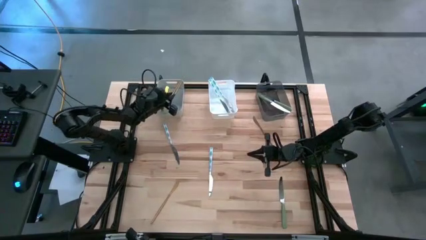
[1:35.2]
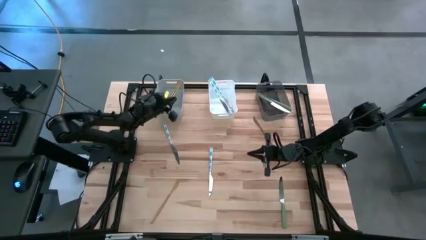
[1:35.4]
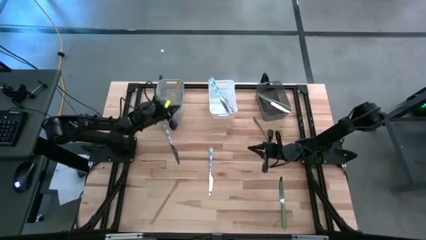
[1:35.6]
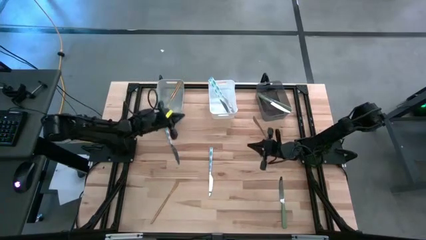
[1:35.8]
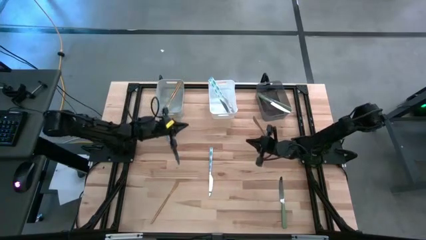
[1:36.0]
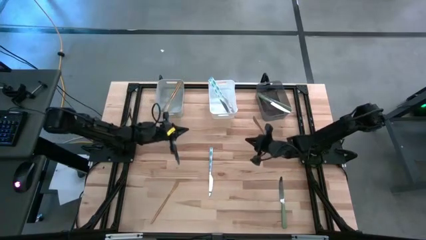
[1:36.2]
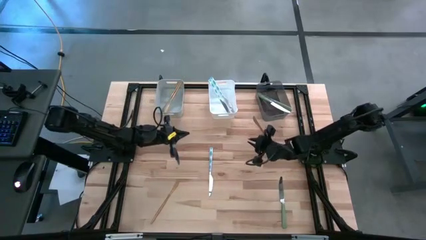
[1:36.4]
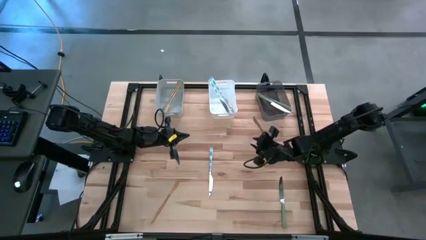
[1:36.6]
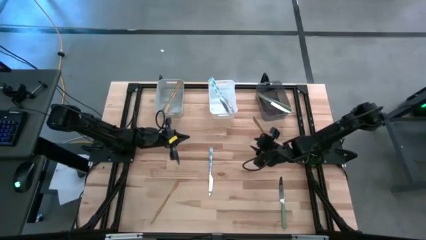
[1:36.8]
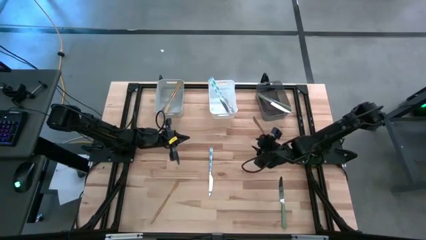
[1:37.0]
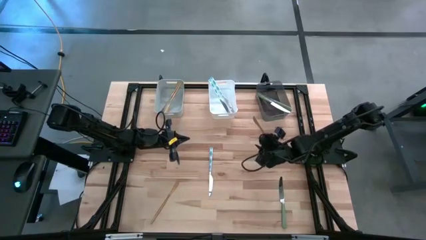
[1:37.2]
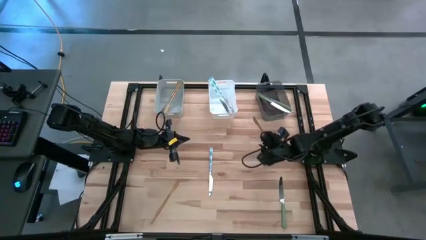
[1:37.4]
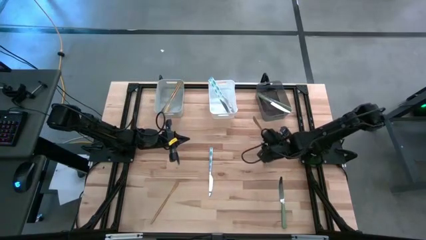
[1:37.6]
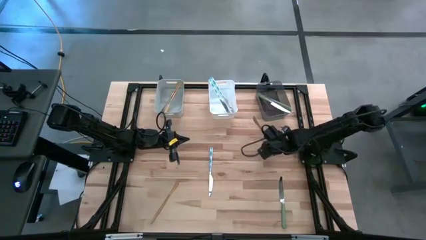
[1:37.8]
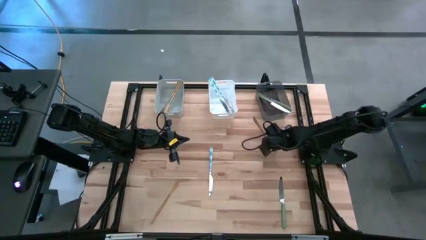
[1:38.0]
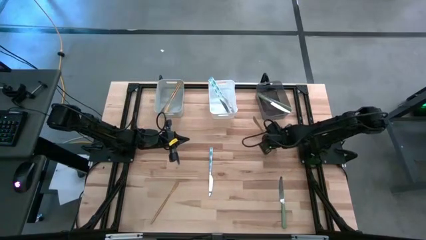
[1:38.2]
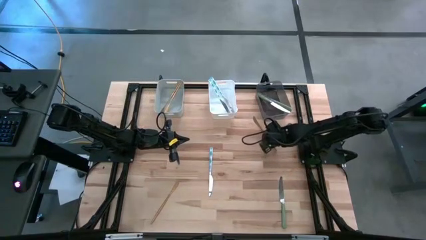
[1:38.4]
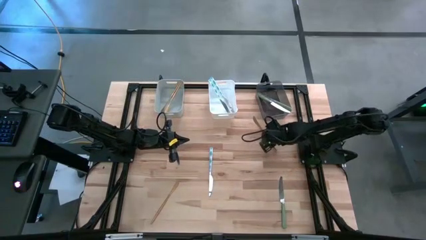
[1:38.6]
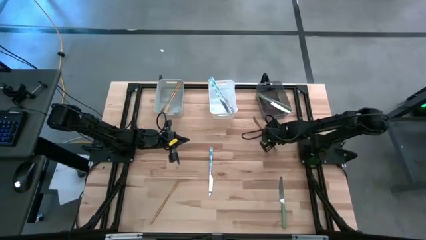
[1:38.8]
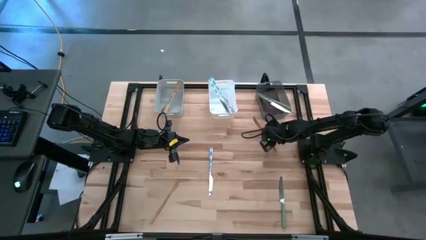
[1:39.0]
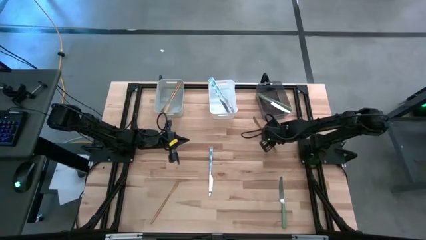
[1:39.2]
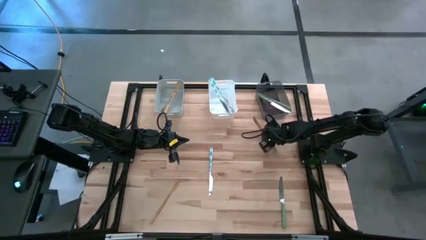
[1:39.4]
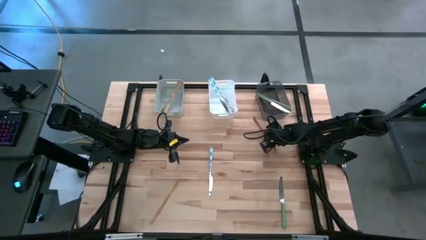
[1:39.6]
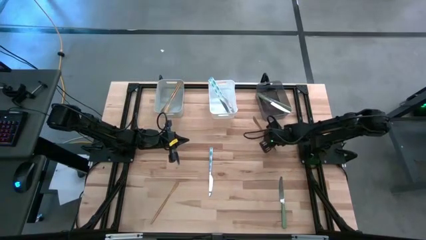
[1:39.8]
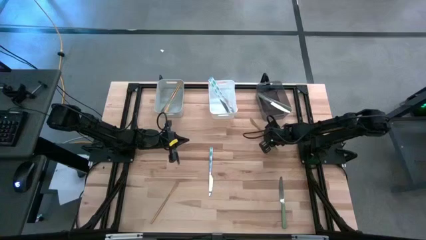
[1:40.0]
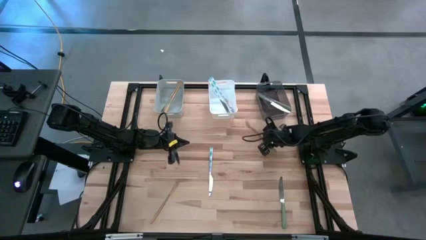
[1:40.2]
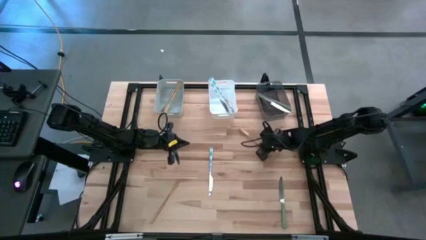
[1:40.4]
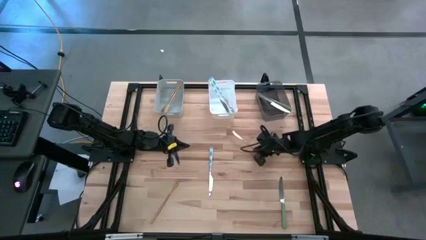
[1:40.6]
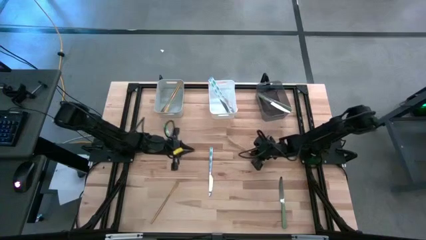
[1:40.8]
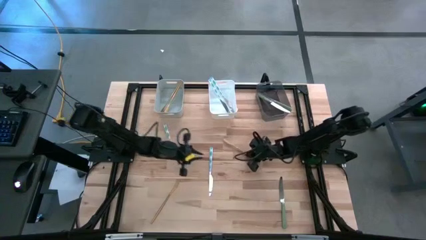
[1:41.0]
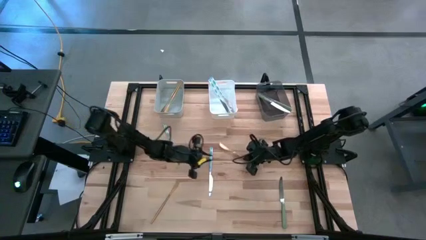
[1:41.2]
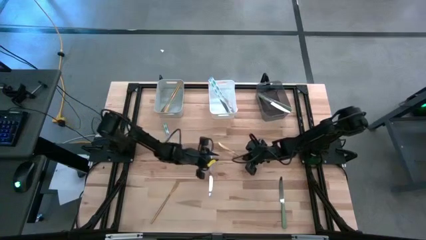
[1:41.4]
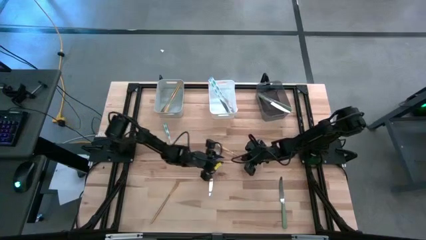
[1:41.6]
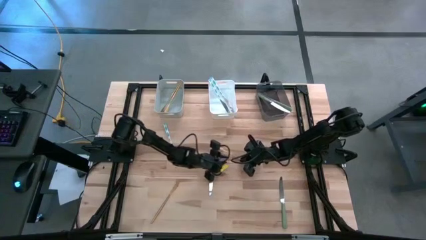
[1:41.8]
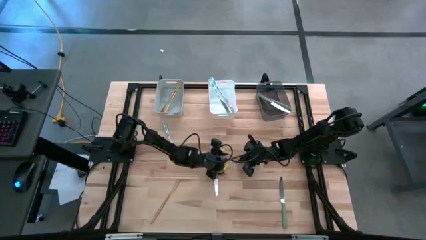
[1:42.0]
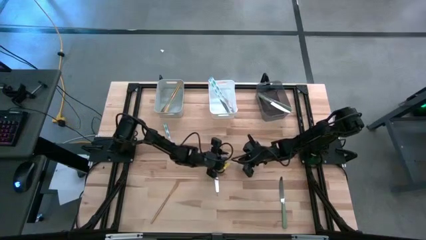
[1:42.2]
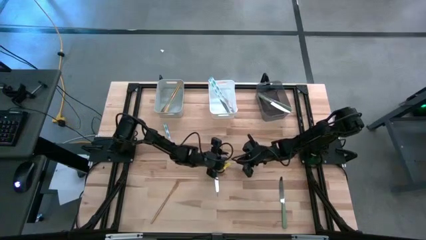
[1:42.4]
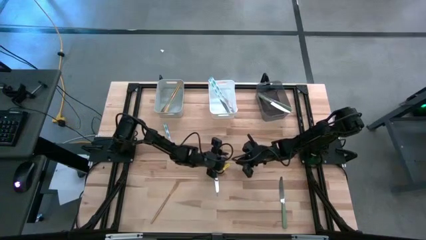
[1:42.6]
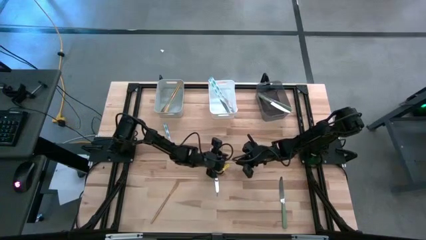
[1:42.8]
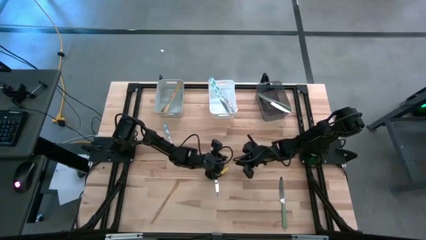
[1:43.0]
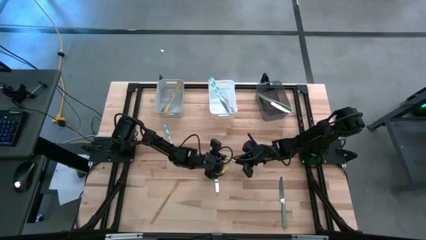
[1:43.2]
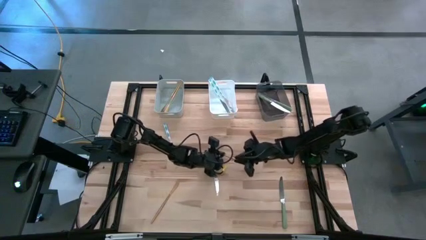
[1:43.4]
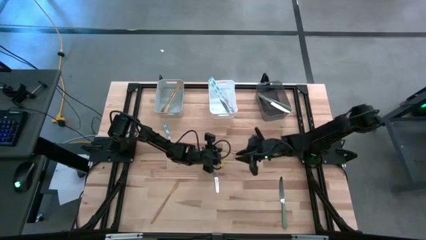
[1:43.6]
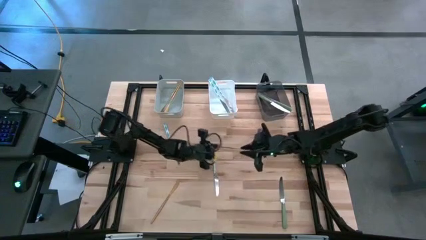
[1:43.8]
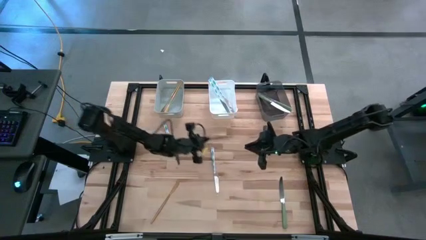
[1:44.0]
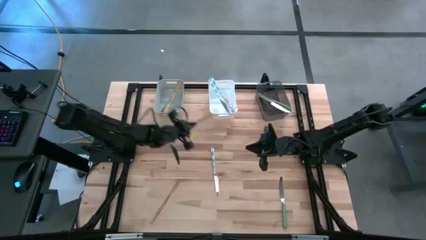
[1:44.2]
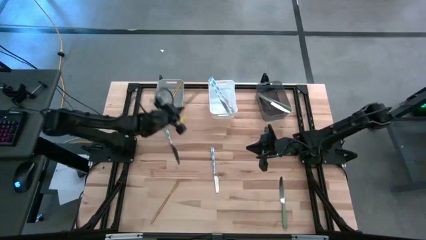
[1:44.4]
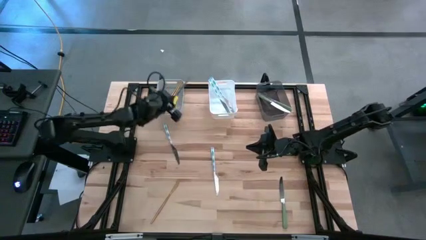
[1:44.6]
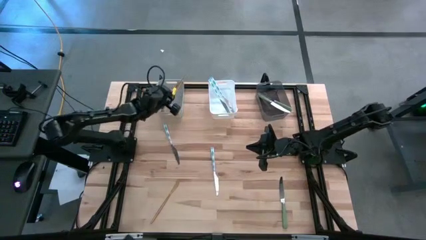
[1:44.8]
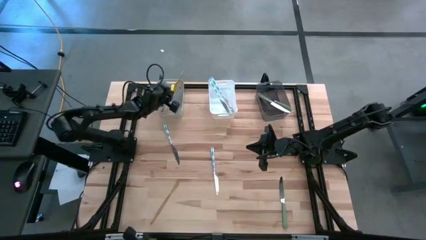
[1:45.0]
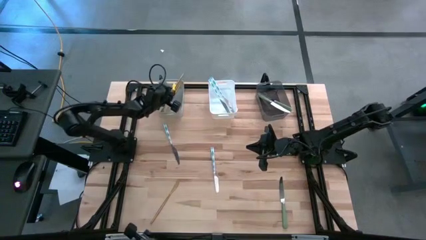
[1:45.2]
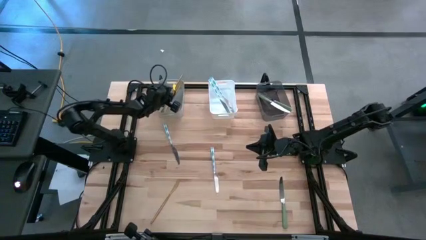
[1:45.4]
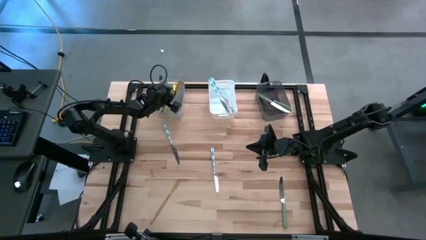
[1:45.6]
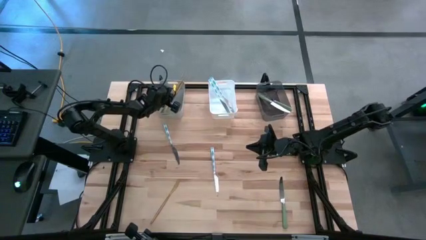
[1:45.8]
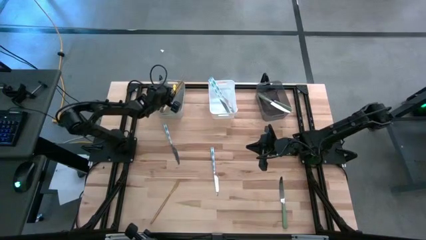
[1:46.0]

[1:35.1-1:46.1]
Task: Sort silverware by color (type)
Put the top gold table knife into the gray bin

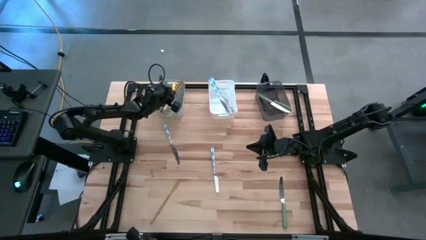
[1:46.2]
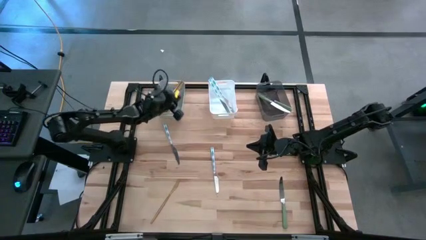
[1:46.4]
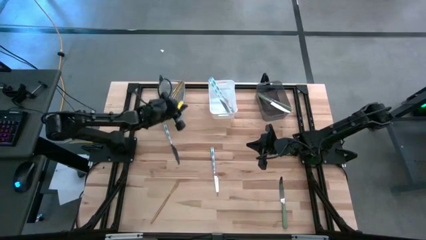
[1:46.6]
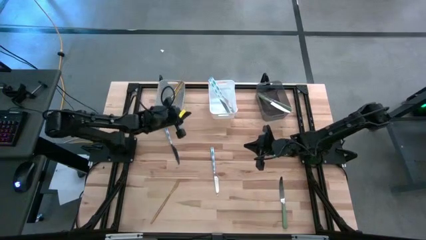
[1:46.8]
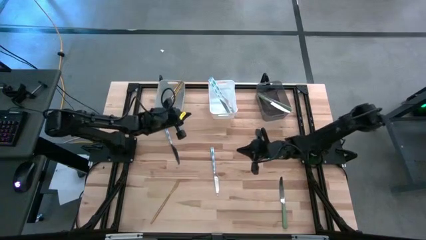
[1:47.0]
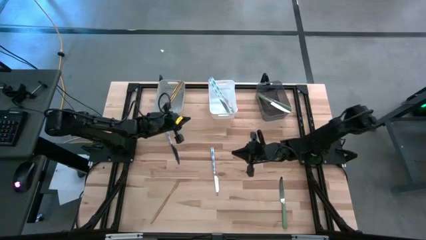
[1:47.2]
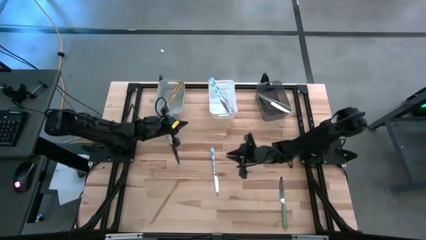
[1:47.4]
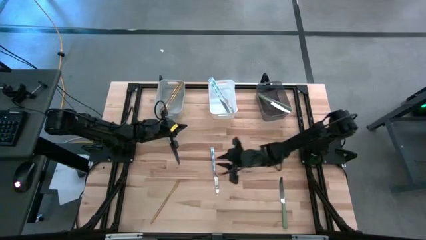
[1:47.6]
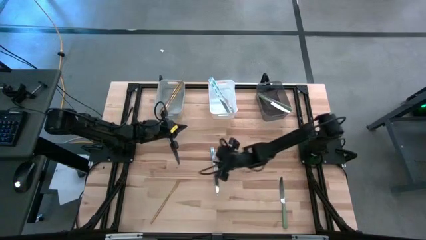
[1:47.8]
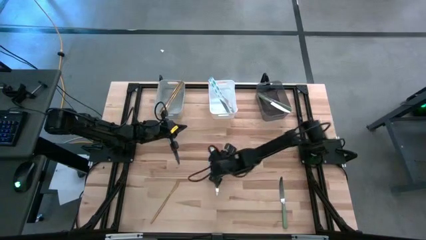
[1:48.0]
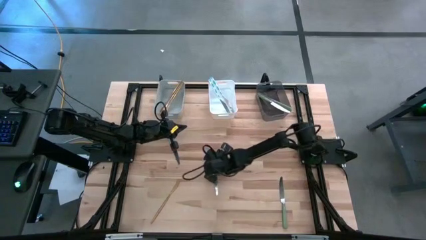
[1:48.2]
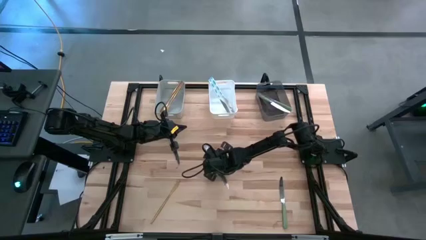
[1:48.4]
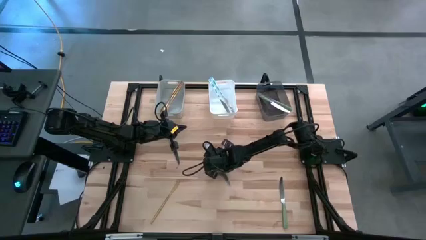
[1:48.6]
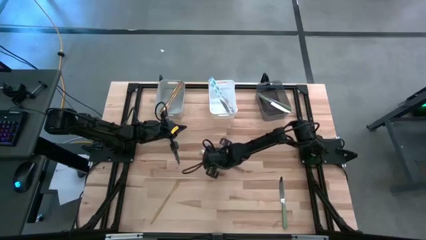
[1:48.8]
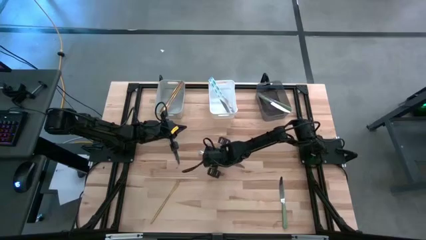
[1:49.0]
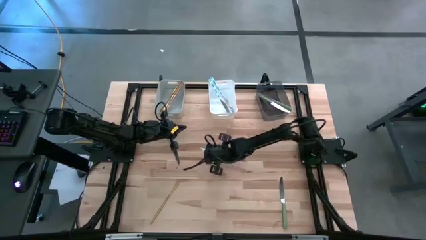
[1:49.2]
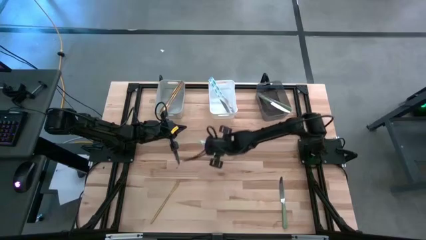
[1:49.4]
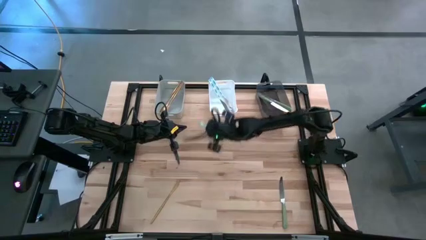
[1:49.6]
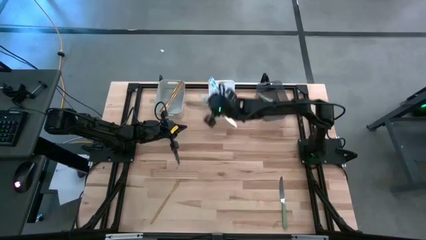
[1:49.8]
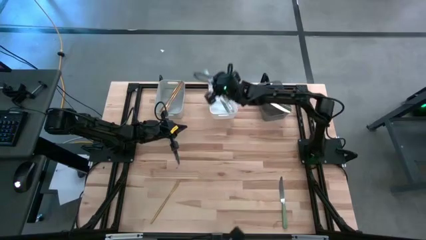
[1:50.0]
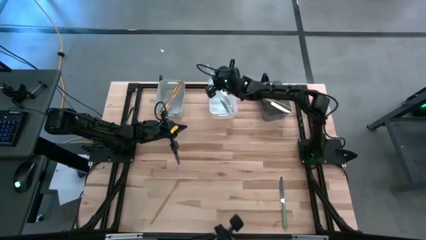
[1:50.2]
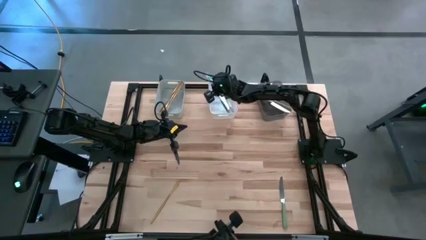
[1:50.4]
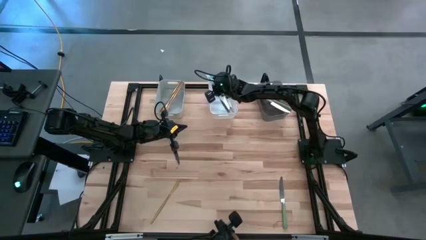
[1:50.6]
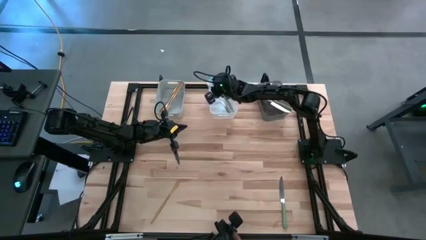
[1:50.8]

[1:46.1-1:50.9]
Put the right blue table knife into the white bin
